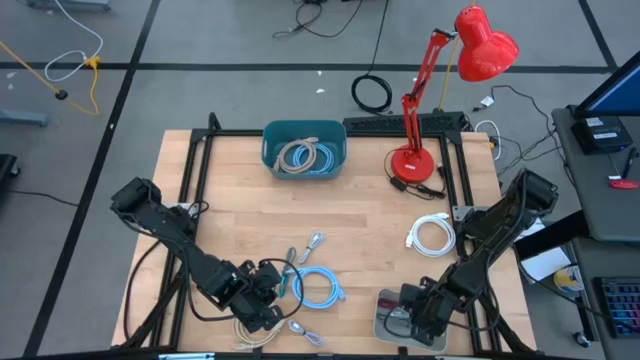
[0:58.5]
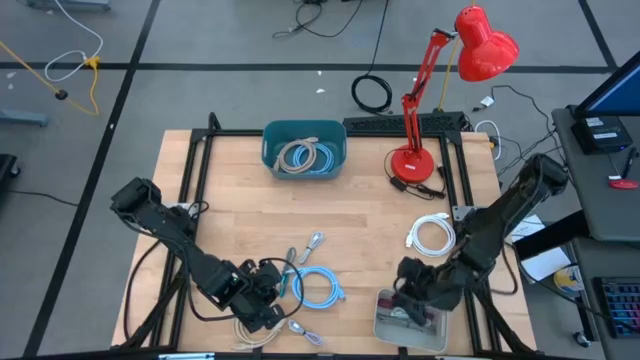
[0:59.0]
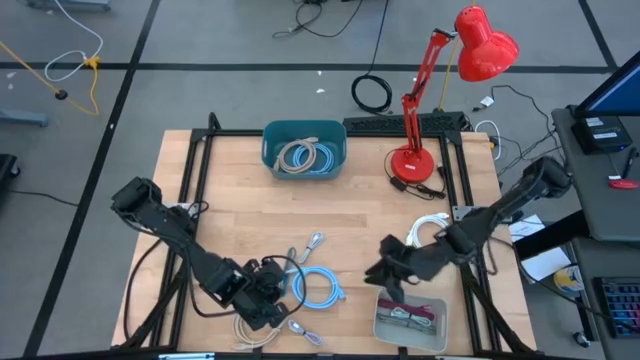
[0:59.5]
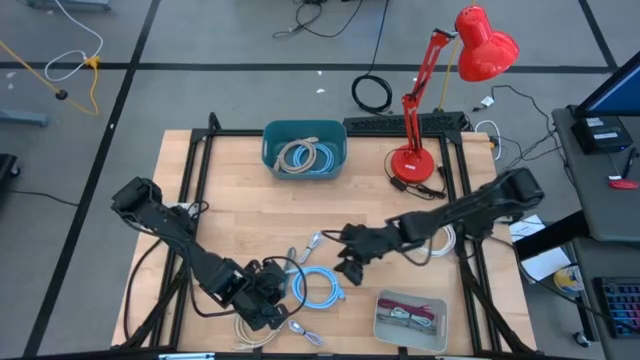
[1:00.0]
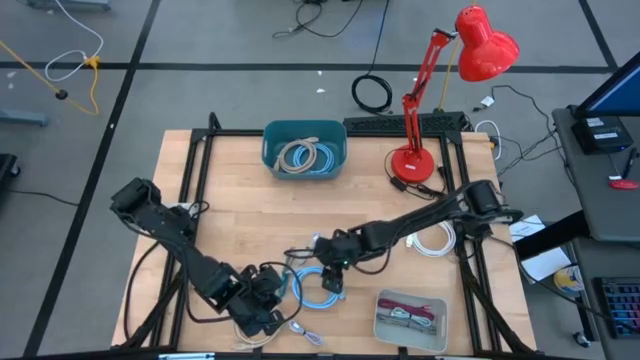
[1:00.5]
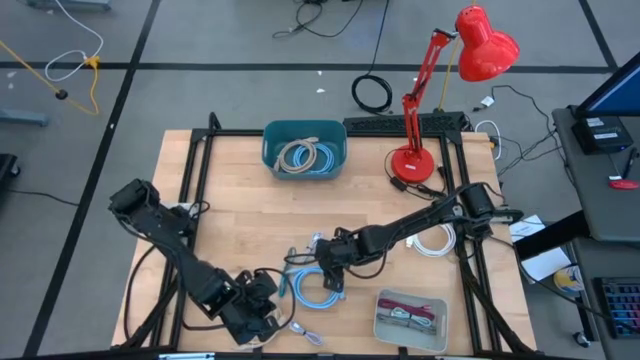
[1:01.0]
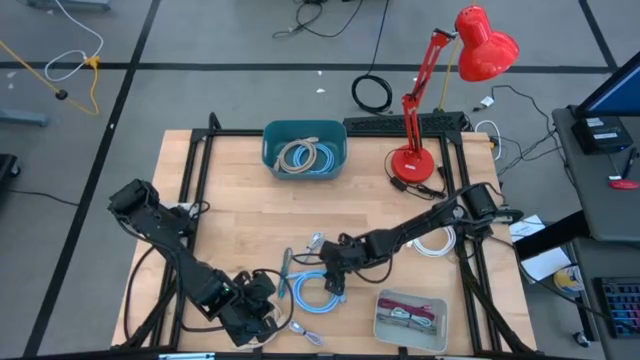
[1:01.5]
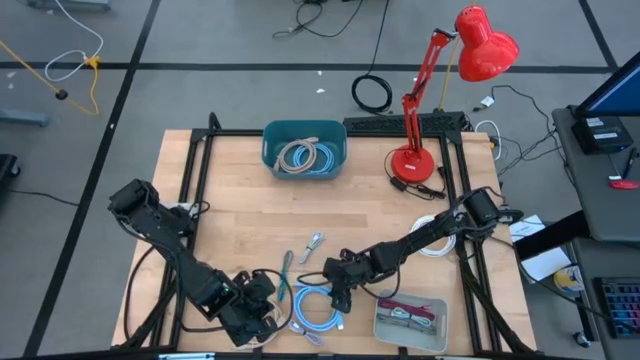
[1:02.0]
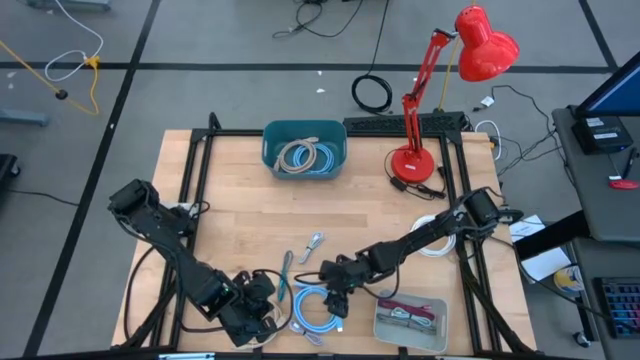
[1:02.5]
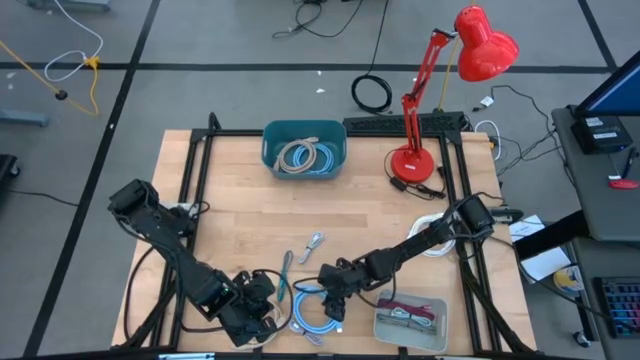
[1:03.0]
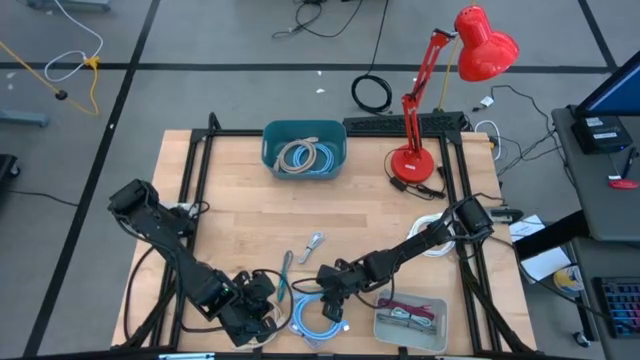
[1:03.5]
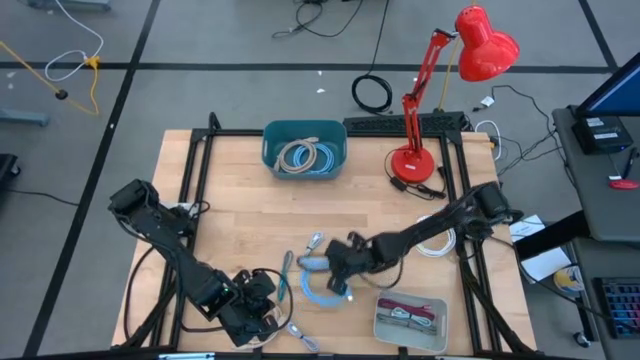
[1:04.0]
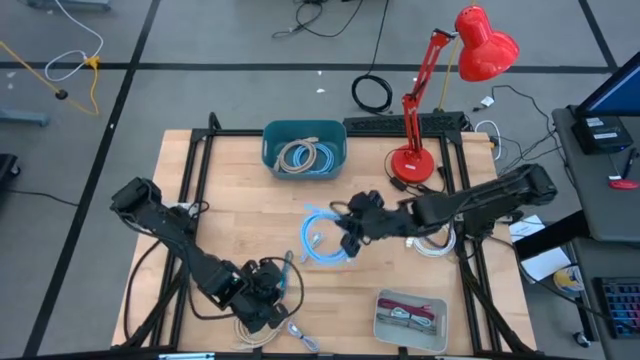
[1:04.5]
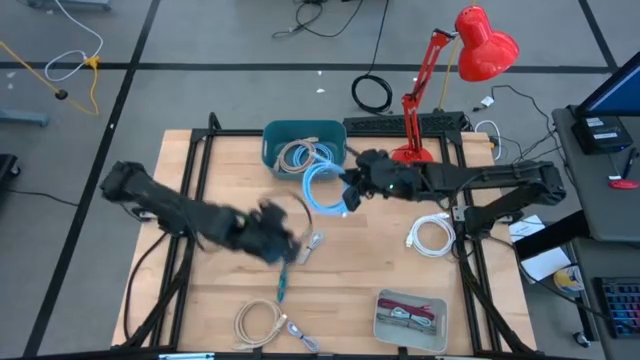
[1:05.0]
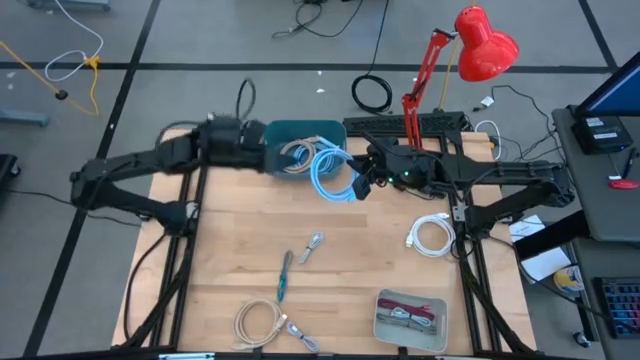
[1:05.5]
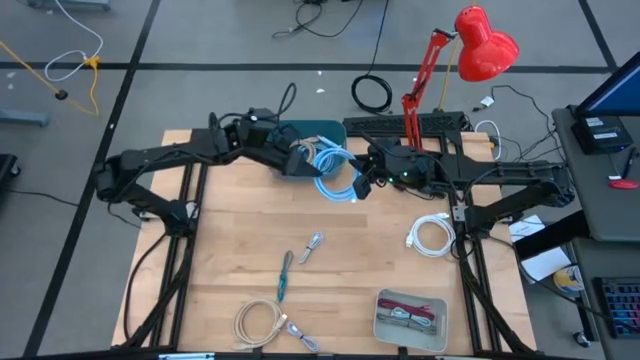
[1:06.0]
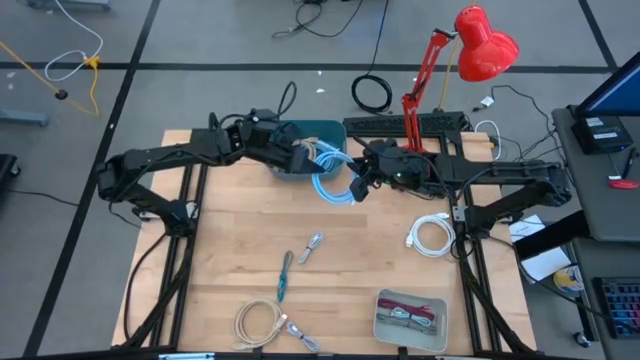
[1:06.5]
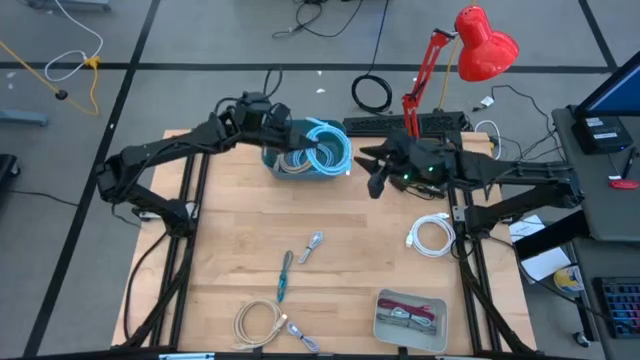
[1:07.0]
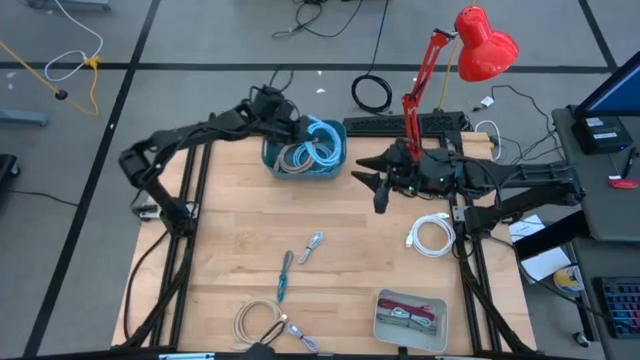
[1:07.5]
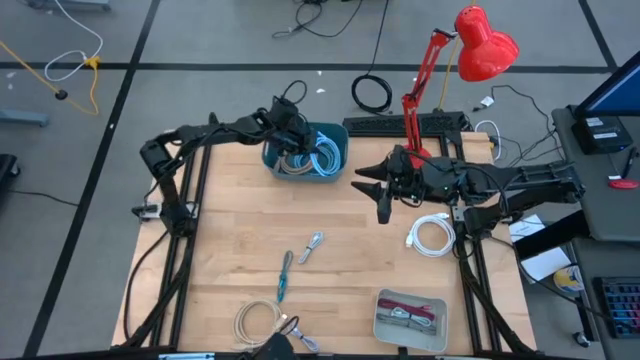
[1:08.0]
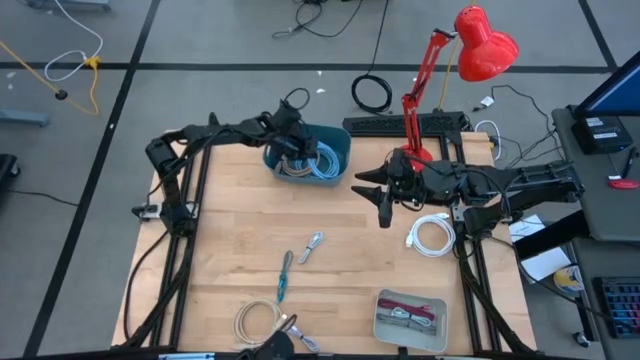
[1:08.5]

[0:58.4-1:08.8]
Task: Sort cables into bins
Put the blue HDMI cable into the blue bin

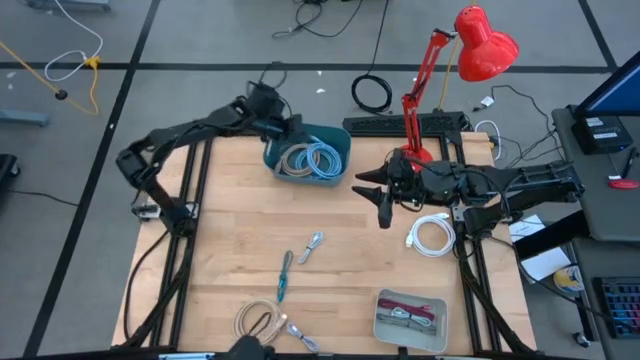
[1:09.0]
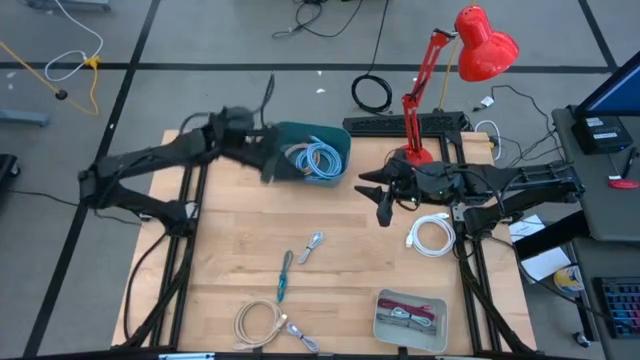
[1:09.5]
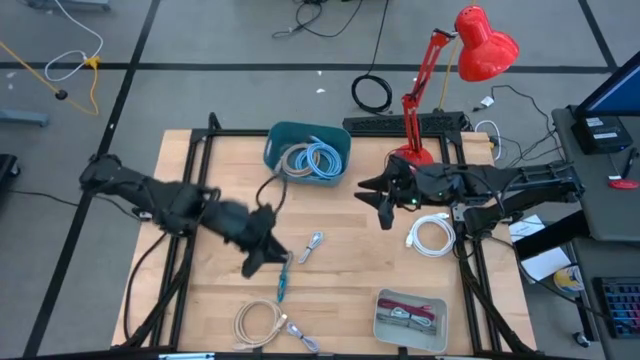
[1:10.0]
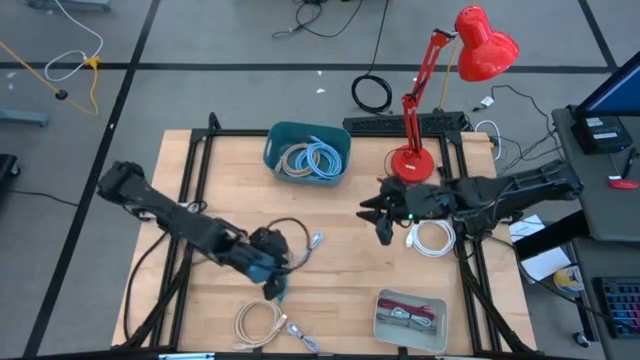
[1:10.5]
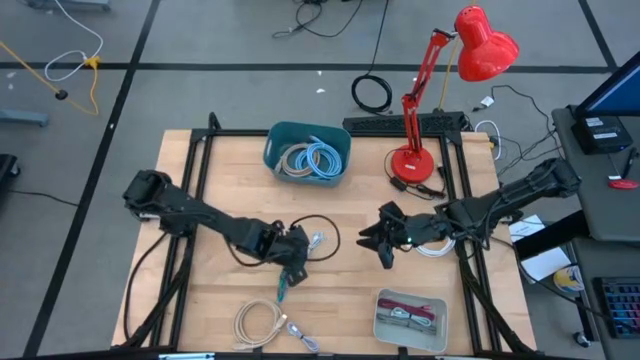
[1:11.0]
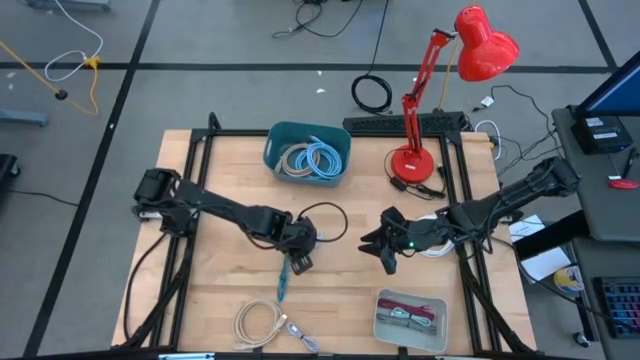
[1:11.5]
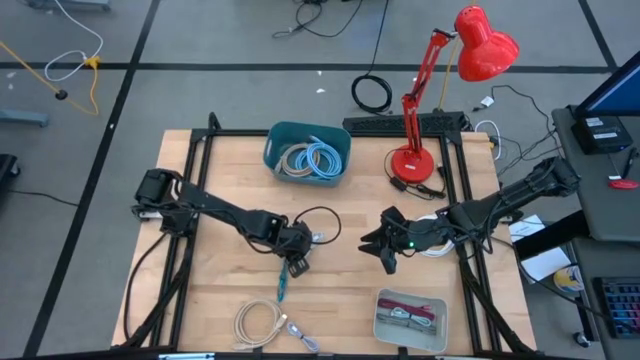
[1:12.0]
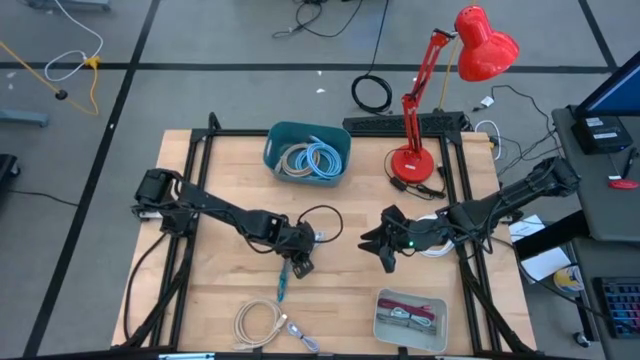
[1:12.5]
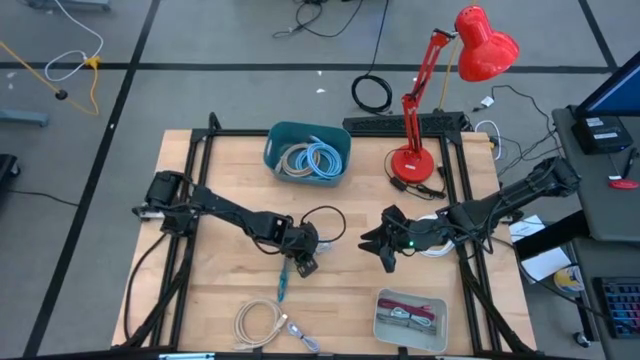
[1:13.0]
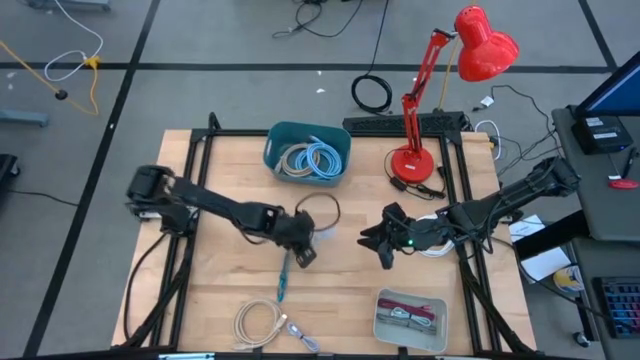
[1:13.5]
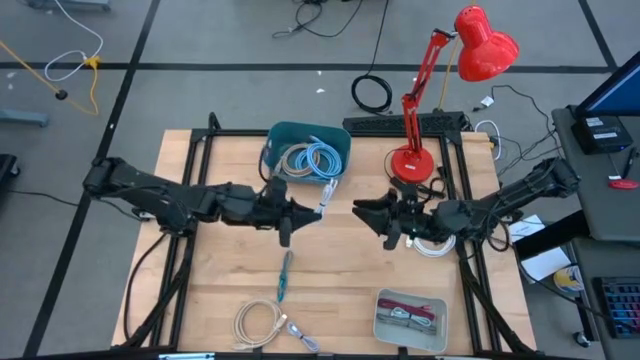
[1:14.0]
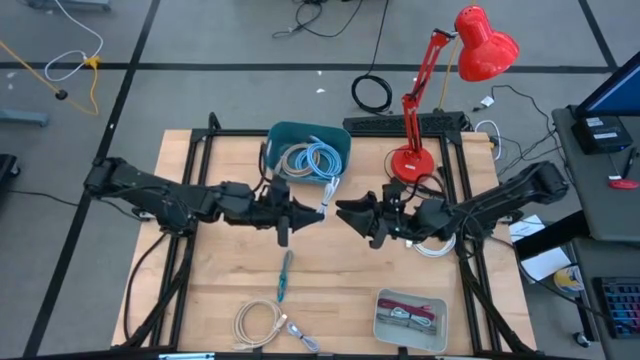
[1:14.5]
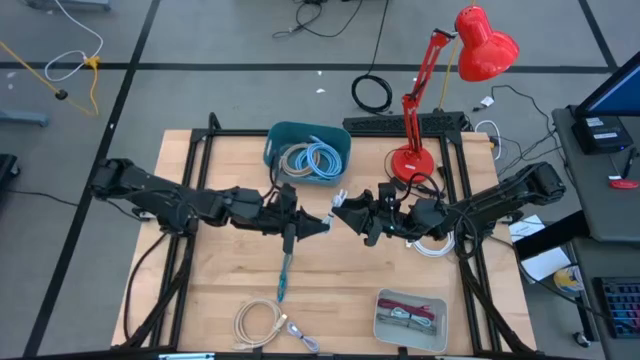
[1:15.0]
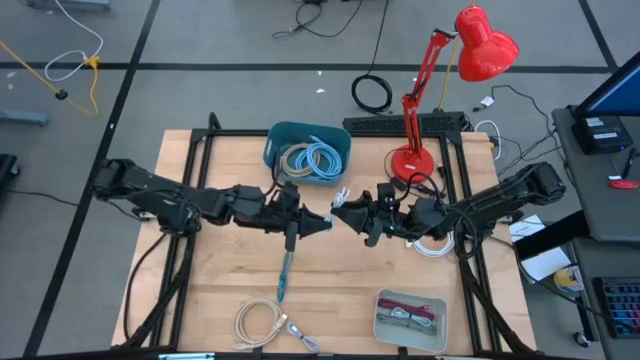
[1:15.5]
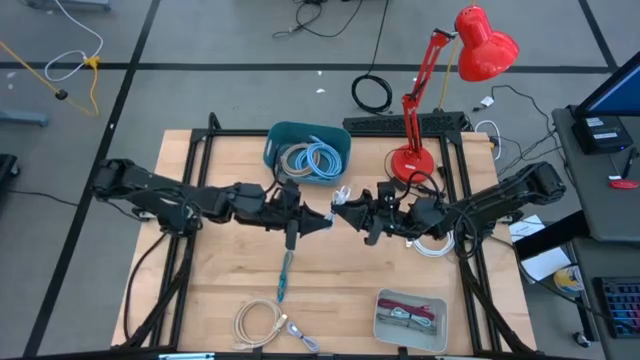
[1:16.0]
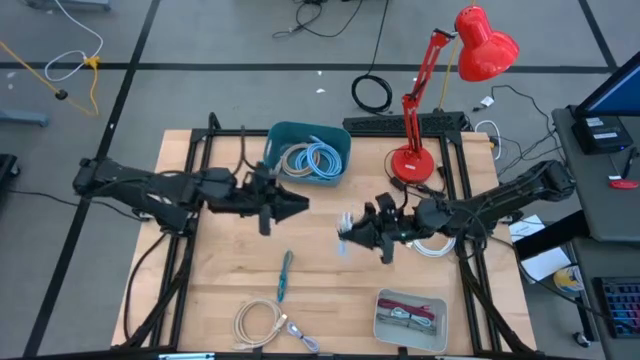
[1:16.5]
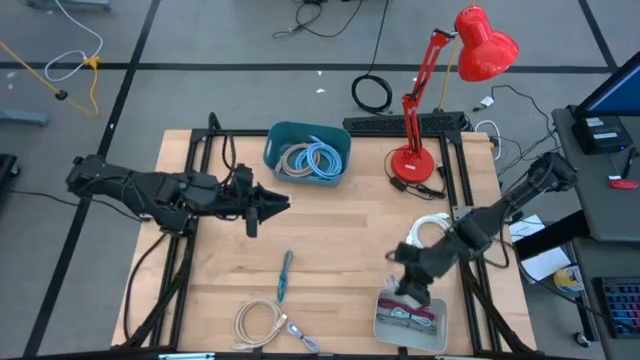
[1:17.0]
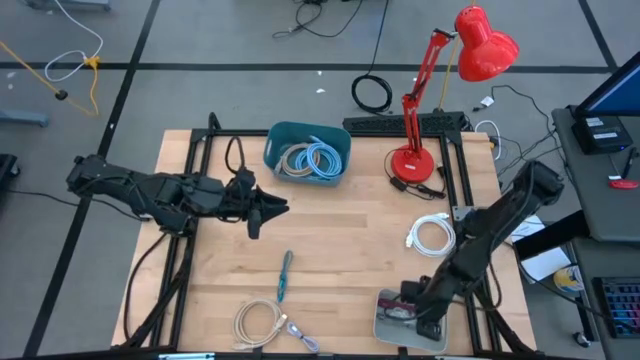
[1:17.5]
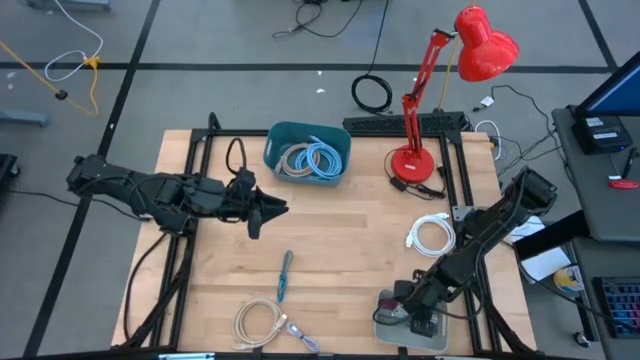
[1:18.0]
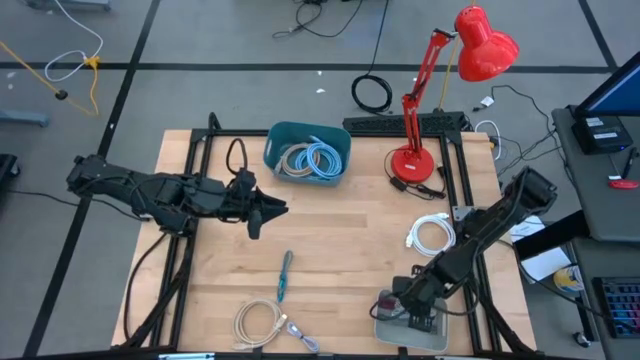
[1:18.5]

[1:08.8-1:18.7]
Put the white charger cable into the gray bin
